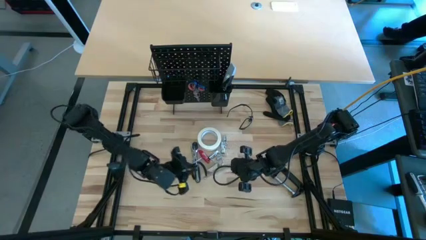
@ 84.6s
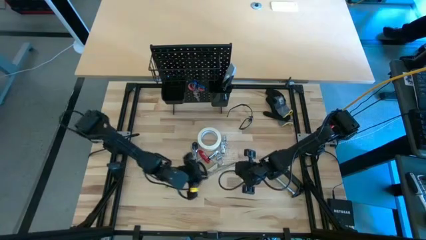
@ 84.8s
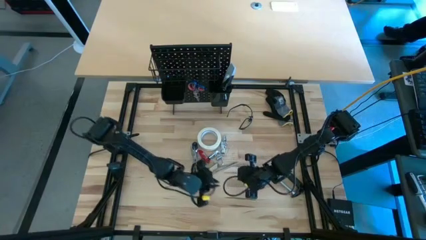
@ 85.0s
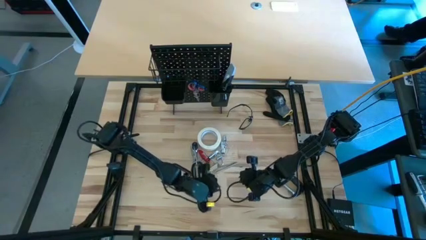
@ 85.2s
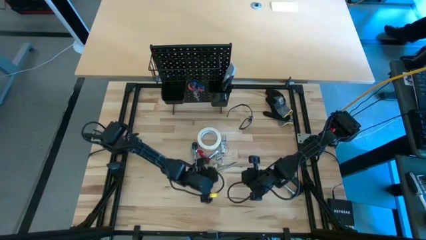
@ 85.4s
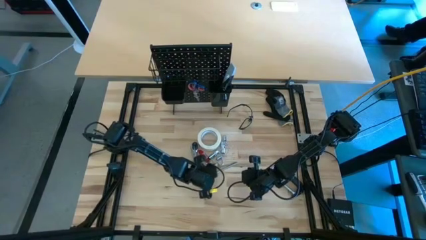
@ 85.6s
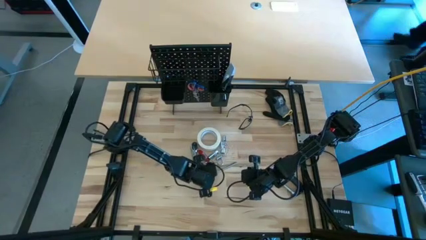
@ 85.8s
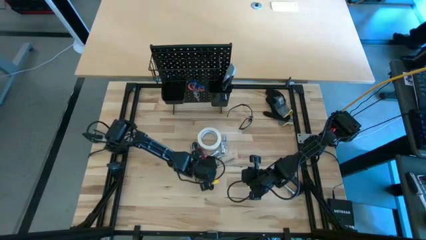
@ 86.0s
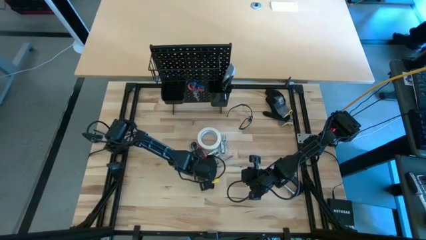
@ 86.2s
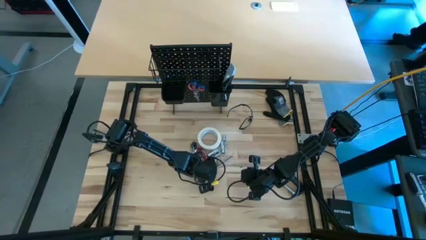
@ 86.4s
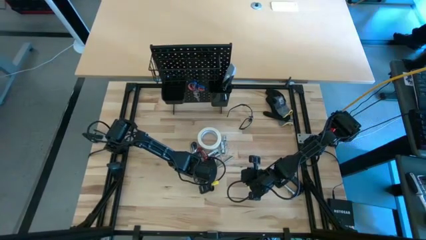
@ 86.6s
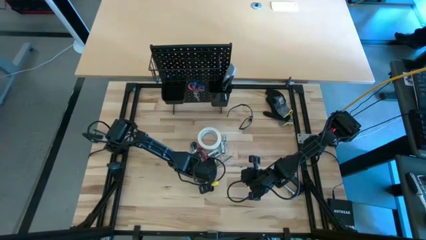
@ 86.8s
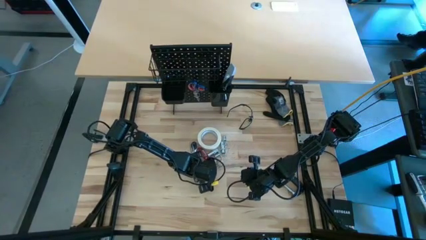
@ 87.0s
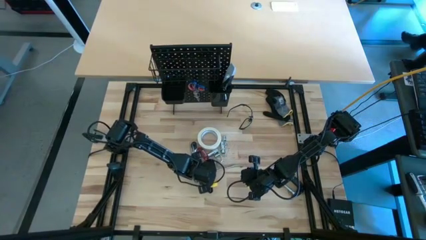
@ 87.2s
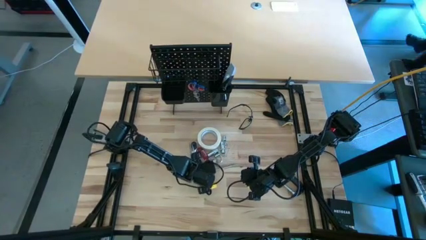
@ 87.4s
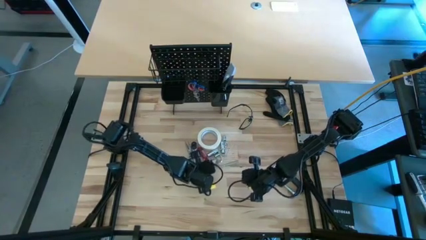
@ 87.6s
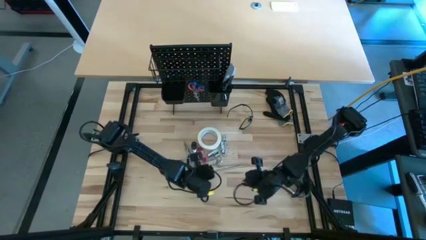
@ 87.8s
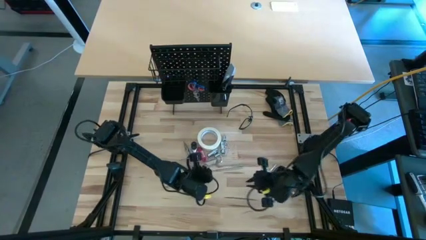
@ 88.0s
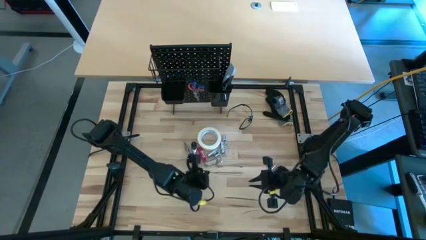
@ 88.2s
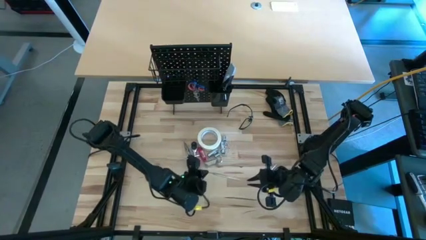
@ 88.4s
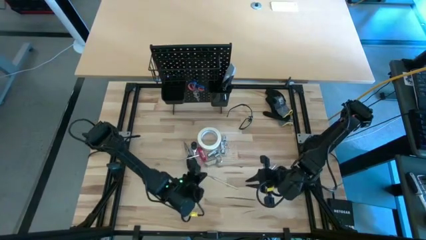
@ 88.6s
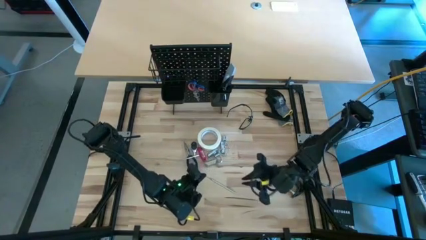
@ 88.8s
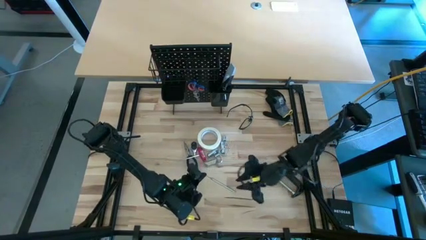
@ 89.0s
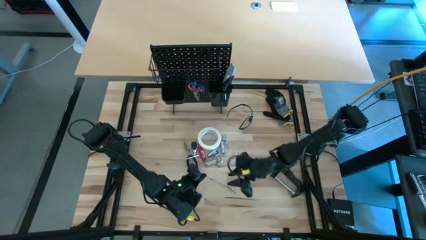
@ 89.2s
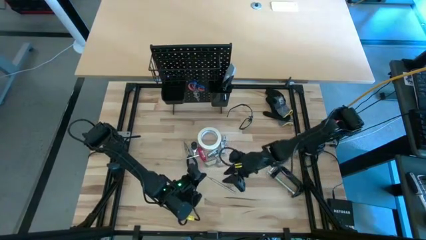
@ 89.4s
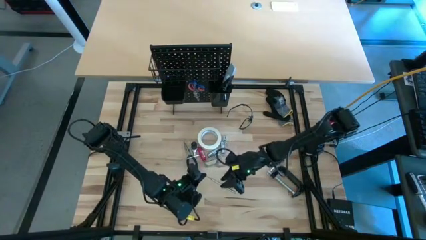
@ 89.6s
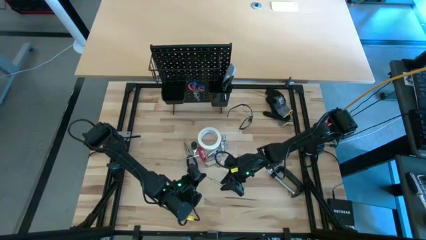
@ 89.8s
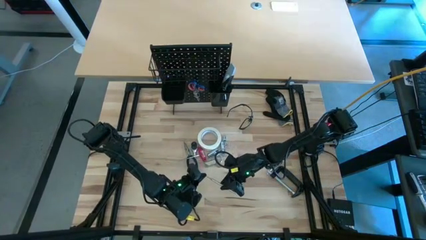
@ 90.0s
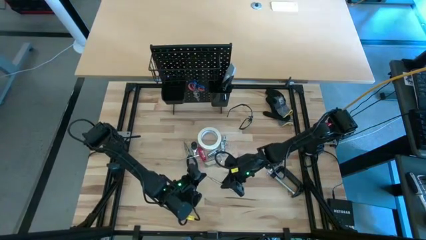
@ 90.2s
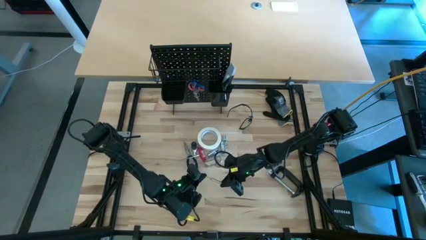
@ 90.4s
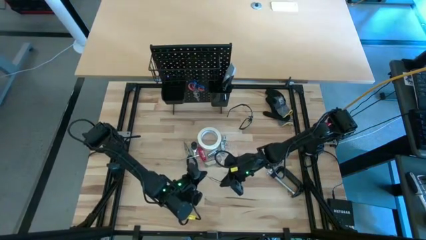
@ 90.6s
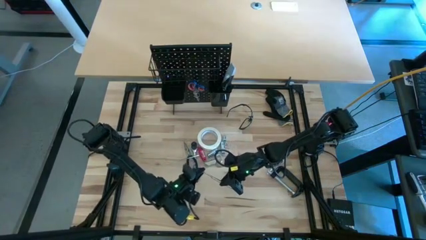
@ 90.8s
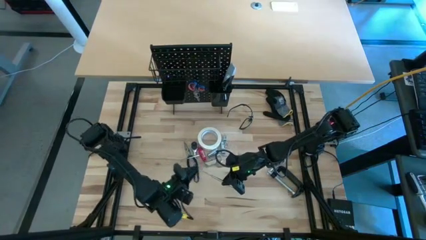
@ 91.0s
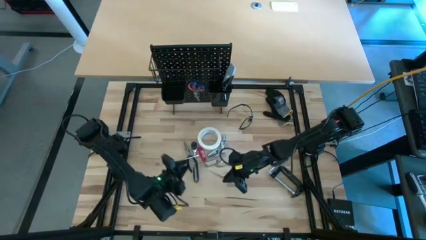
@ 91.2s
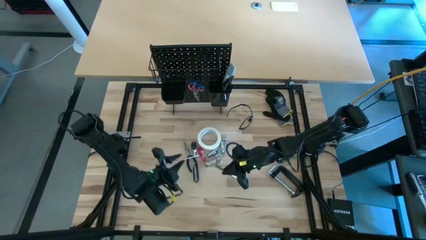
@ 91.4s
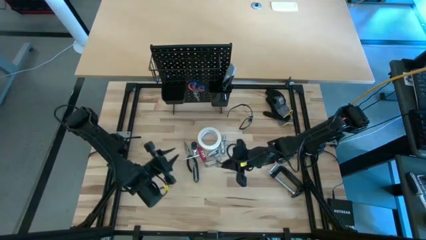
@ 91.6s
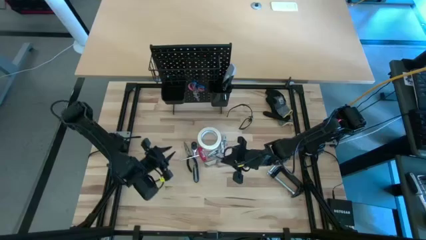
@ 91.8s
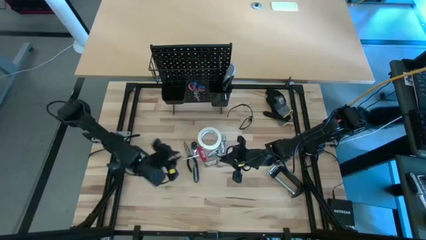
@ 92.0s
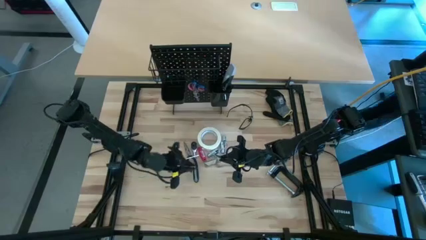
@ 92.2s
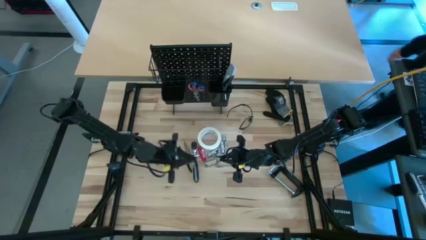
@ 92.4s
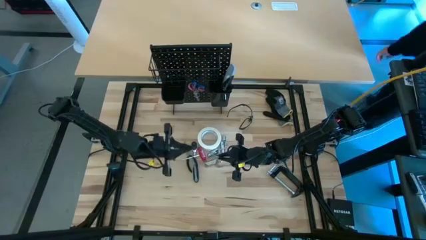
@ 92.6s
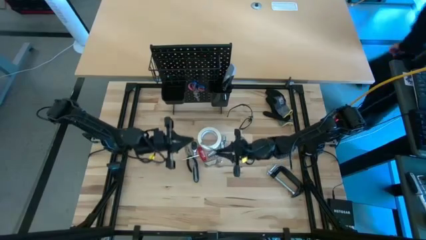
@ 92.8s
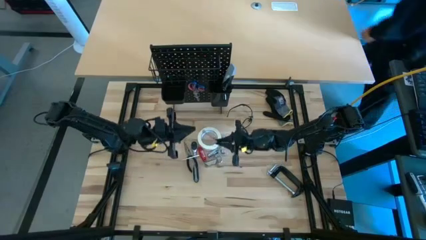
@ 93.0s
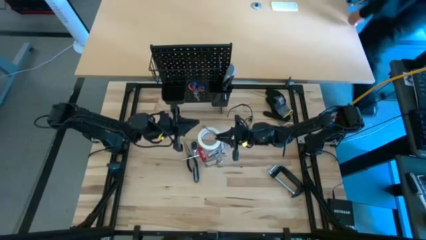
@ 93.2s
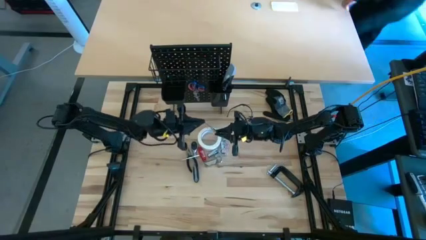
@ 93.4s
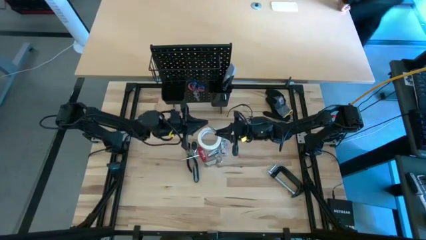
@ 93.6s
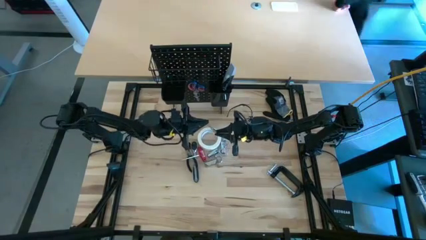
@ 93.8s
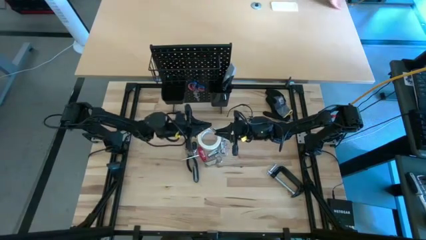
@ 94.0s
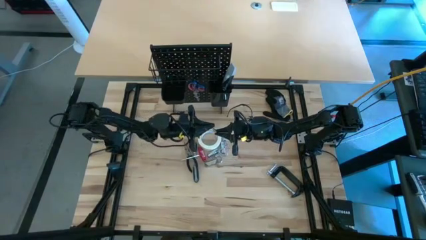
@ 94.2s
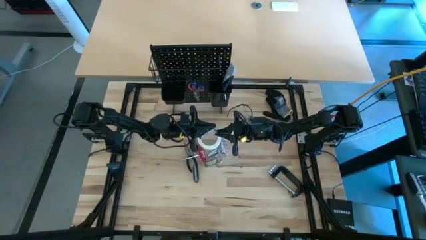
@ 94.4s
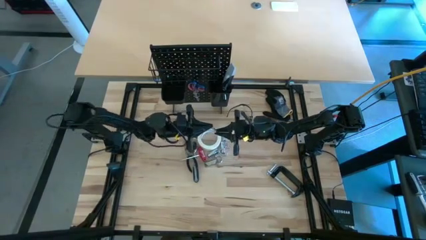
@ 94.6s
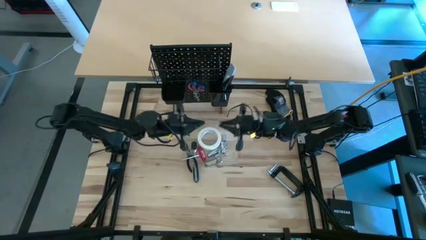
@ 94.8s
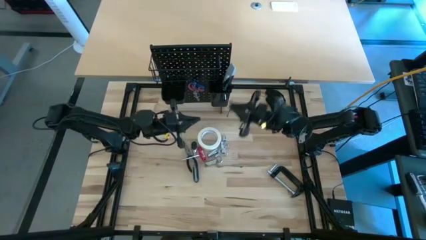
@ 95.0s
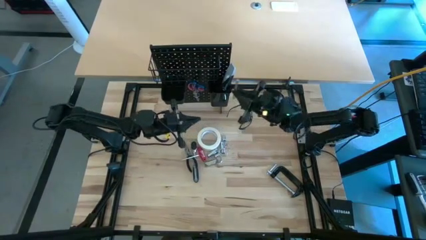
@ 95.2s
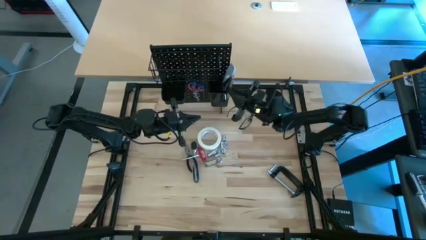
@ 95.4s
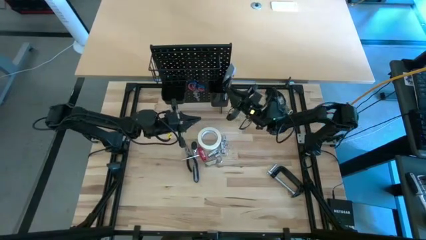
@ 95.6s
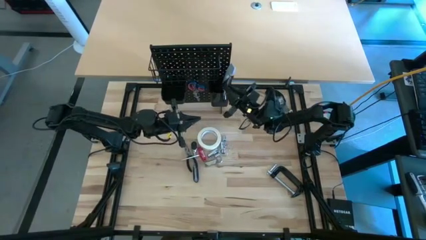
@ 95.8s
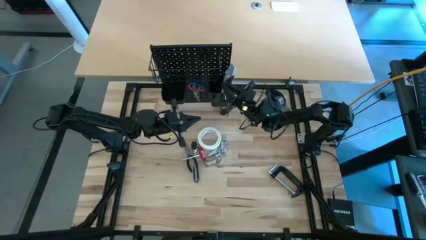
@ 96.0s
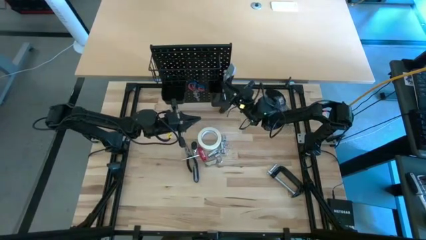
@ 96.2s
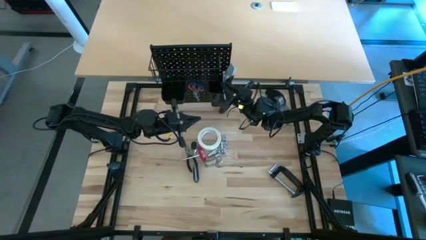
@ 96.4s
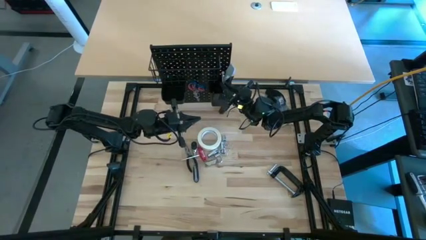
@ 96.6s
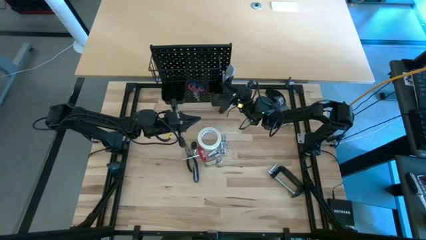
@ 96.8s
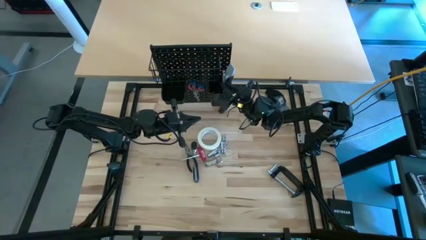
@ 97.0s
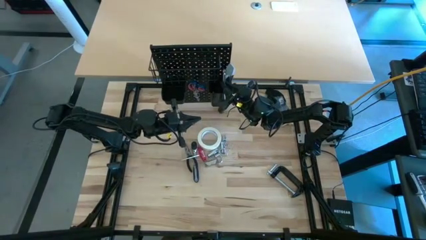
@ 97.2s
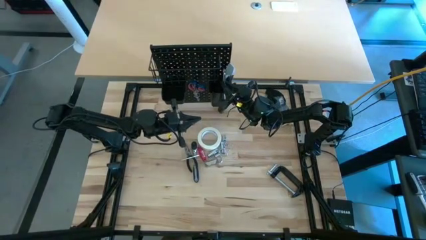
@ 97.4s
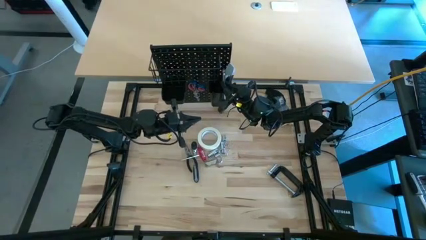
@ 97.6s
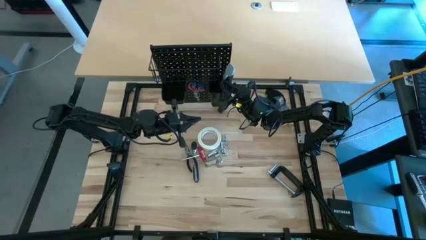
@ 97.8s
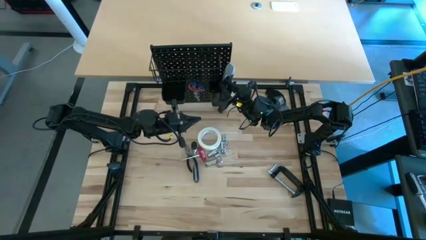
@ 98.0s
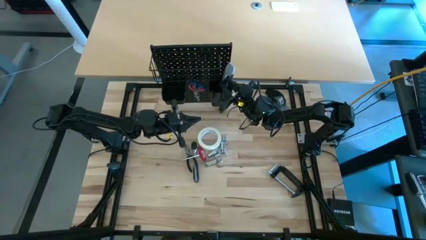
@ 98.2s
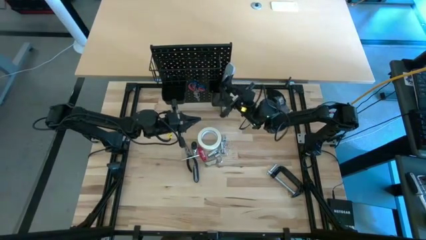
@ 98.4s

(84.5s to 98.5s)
Task: Hang tools onto peg board
Put the silver magnetic telescoping into the right black bin on the peg board

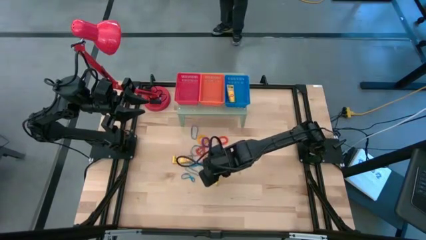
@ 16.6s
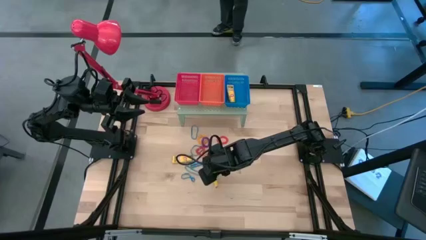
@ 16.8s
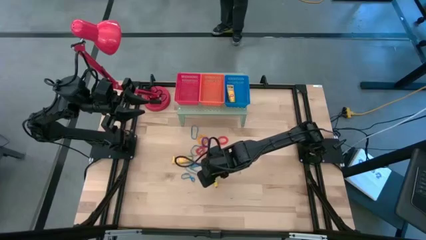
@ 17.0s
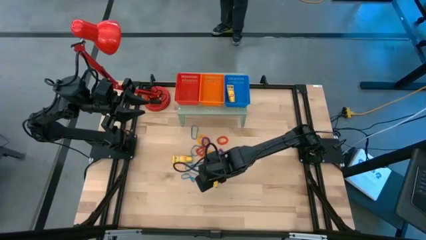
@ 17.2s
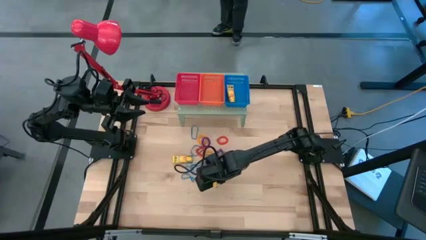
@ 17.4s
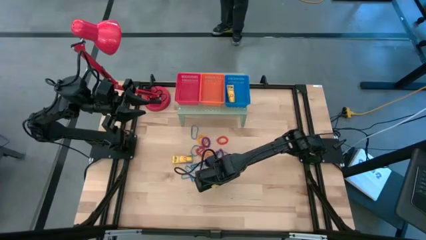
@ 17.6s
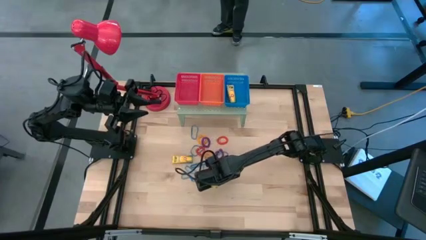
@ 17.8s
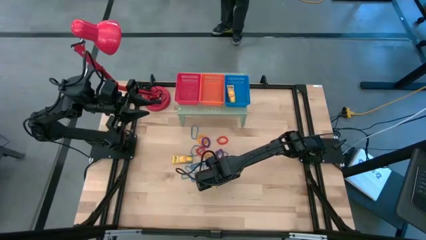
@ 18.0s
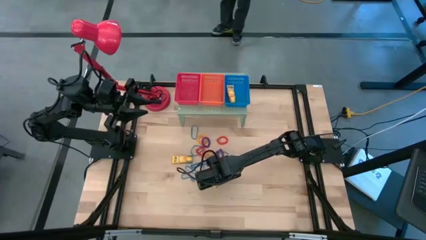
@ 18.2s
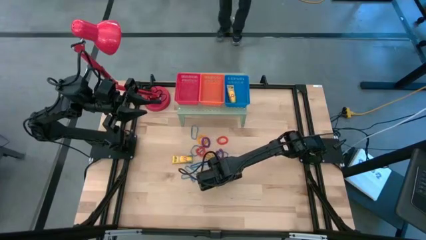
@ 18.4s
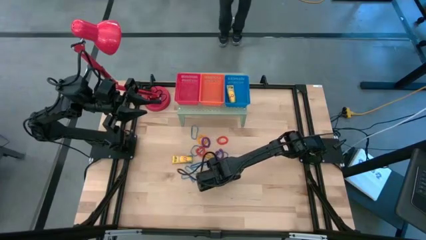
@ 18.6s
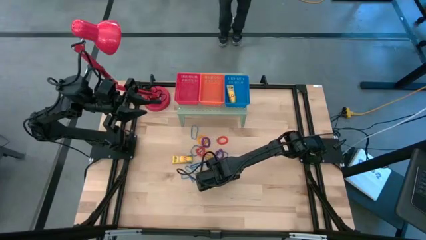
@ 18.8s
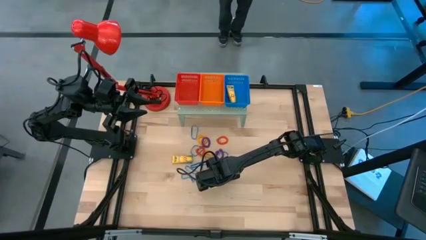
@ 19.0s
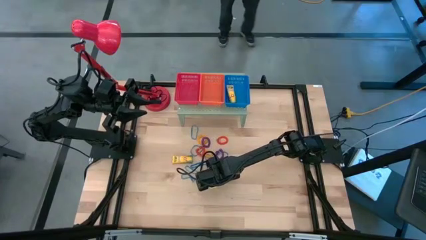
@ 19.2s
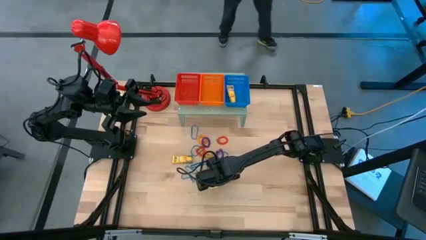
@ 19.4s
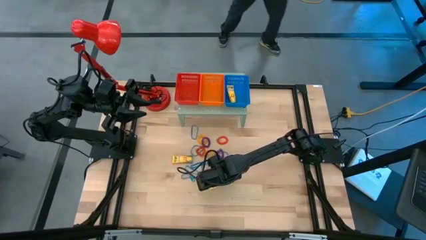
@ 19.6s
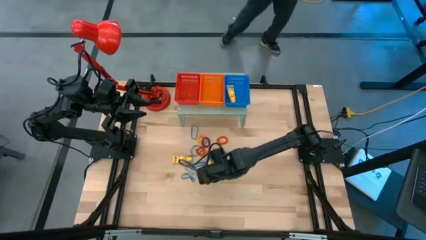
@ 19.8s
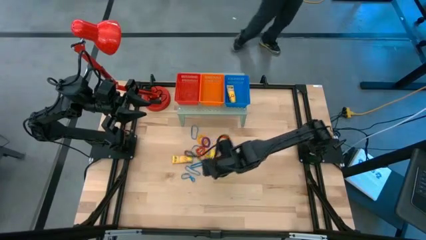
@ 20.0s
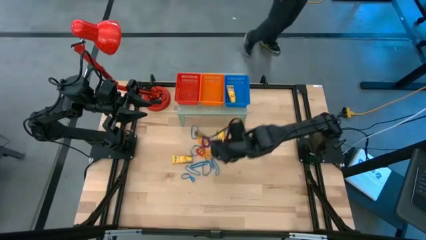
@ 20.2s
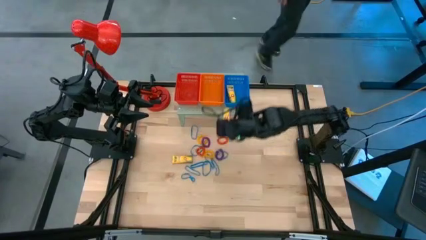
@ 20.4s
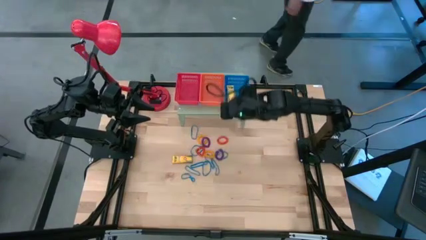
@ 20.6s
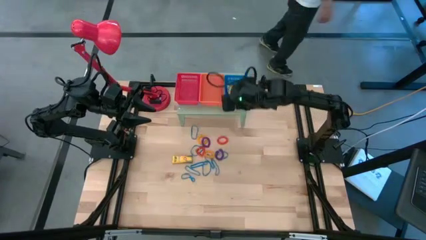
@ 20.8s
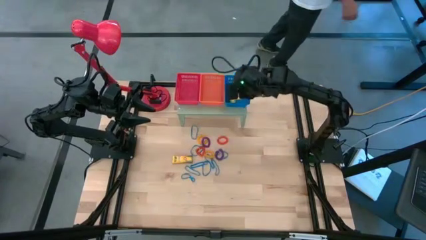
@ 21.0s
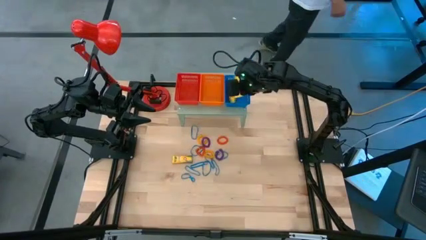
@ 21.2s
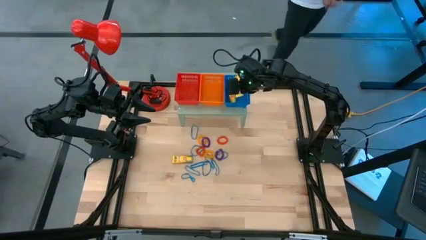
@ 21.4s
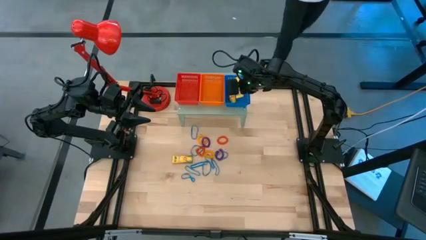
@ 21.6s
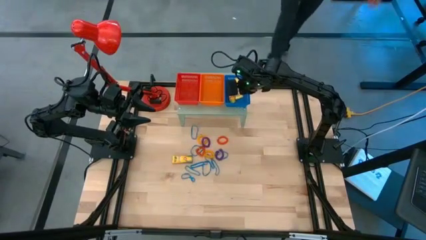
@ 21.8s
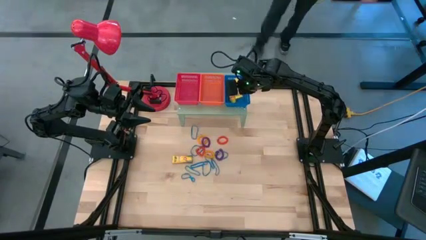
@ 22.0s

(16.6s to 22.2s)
Task: Pick & Place Office Desk Supplies
Put the yellow crayon box into the blue bin on the shelf
